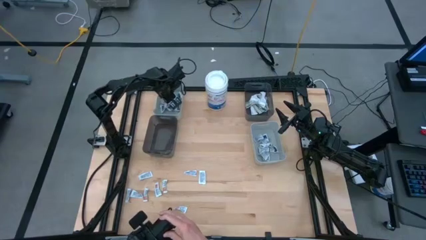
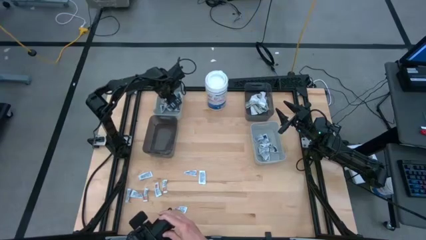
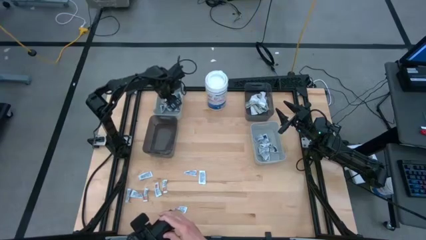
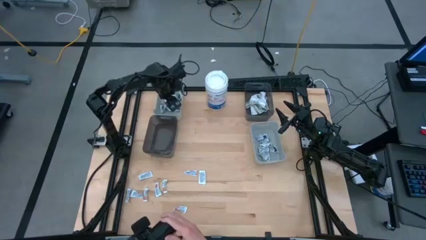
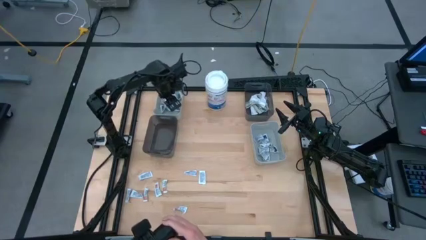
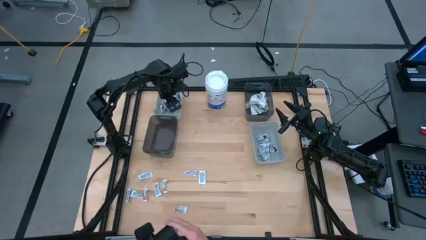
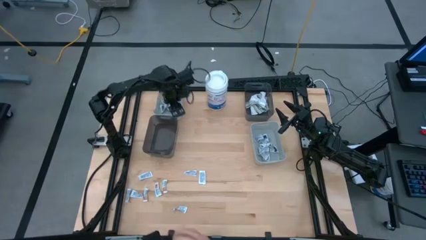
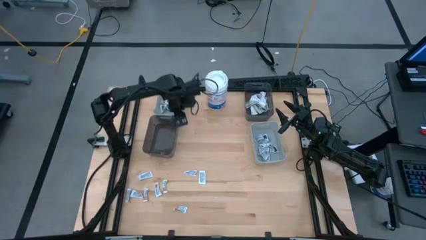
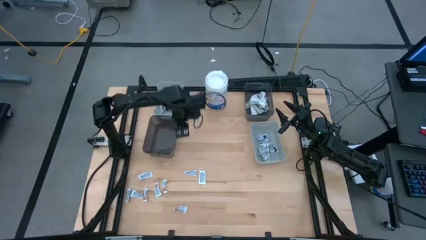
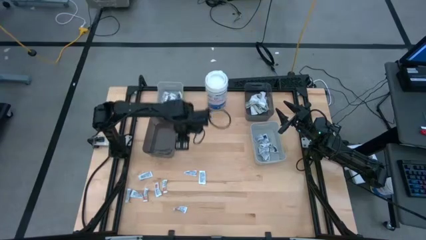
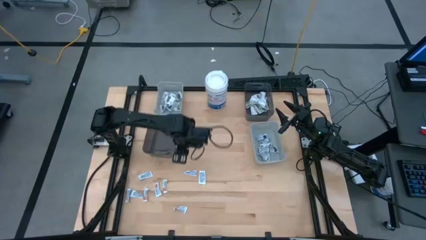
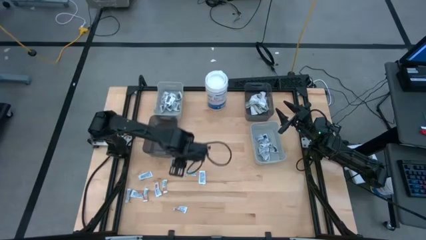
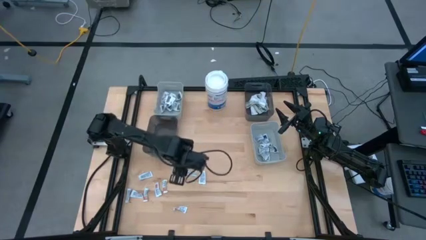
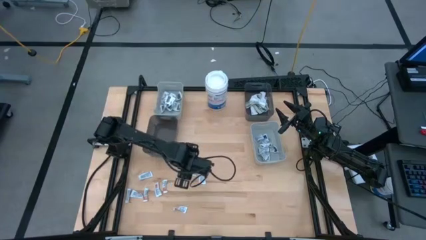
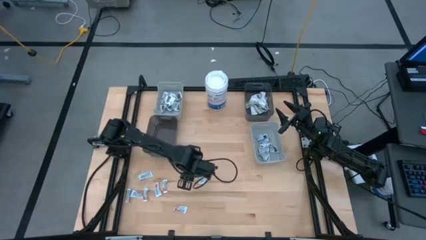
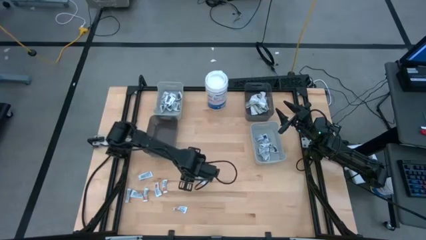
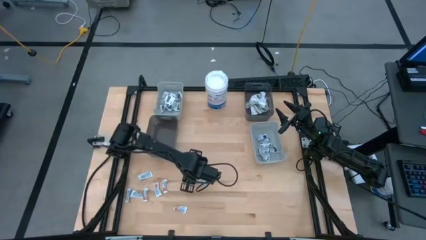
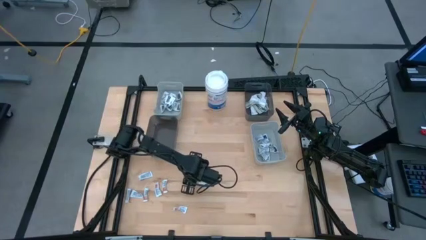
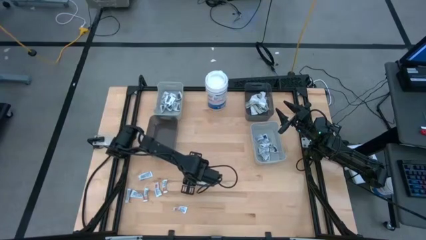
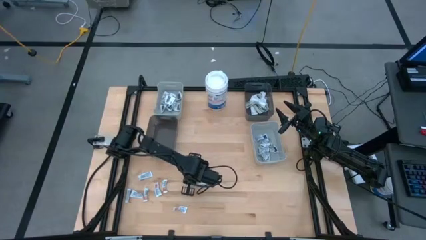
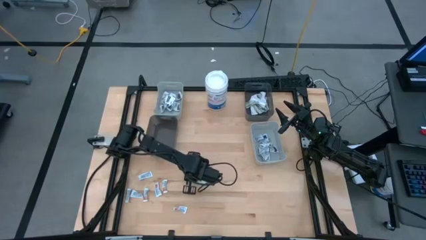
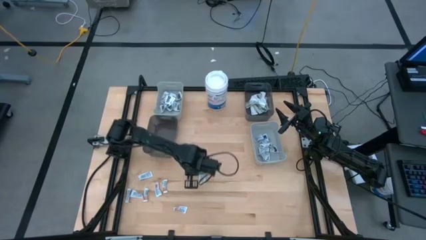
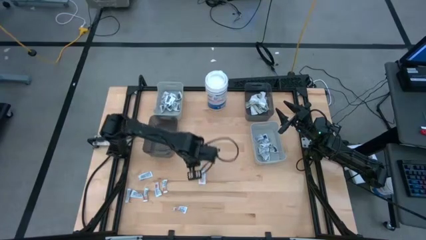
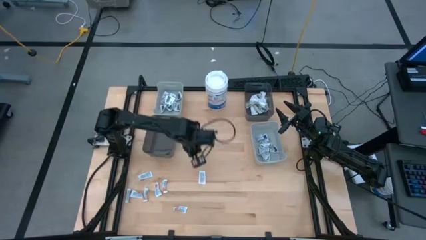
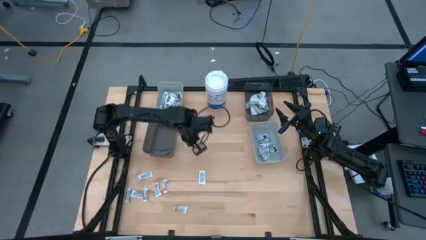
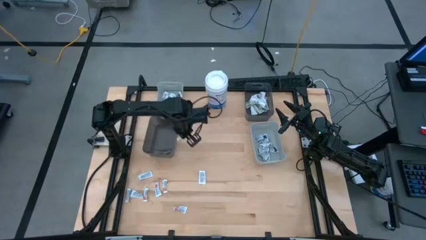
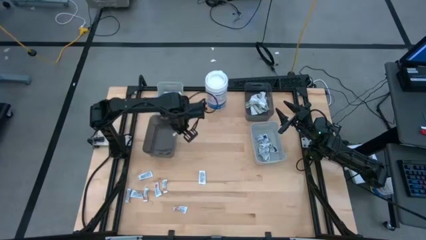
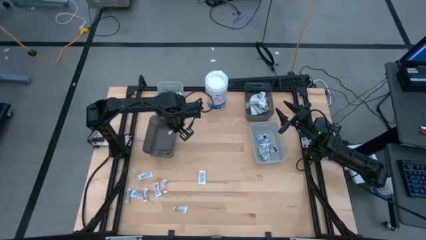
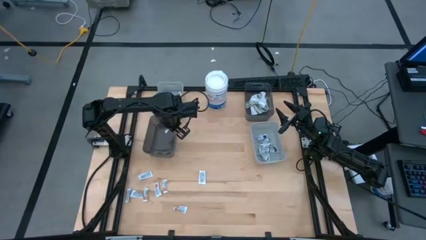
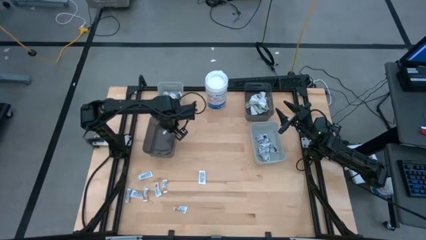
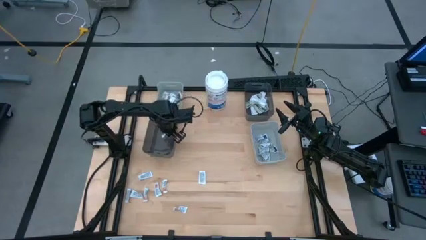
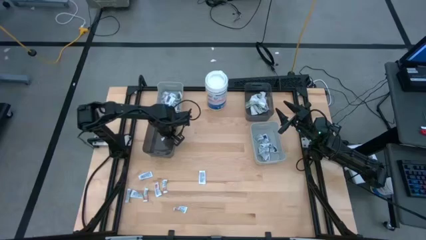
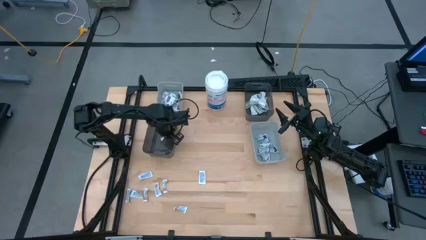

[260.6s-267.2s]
Task: Pick & Place First Aid Supplies
Put the orange ointment pack into the left black bin

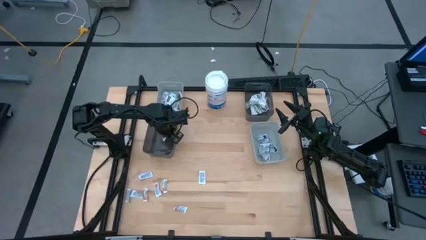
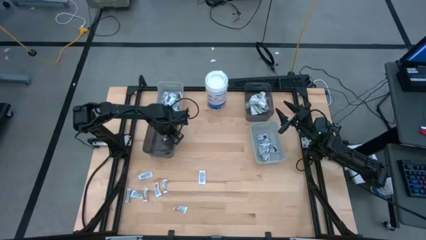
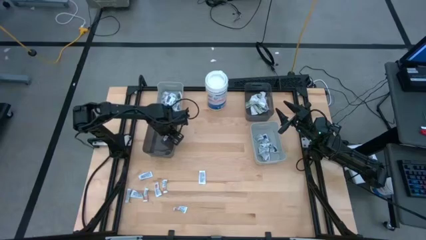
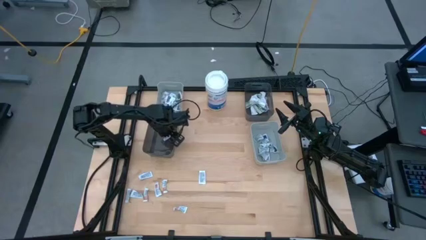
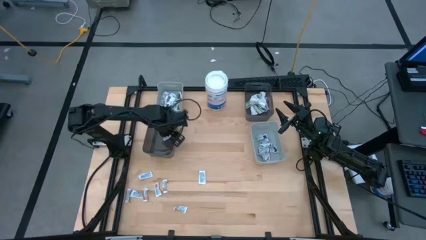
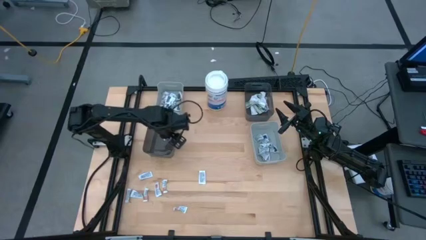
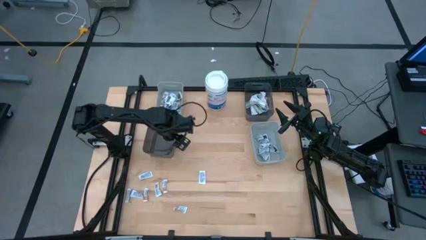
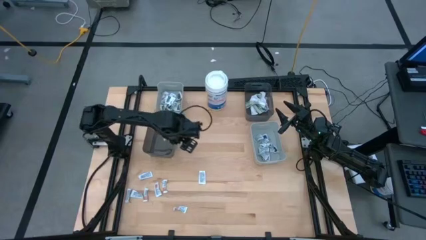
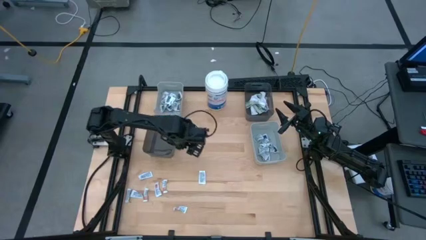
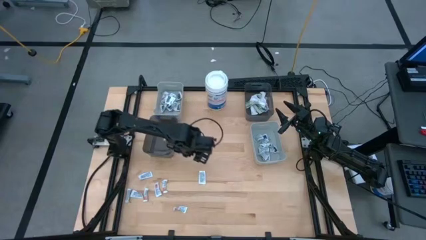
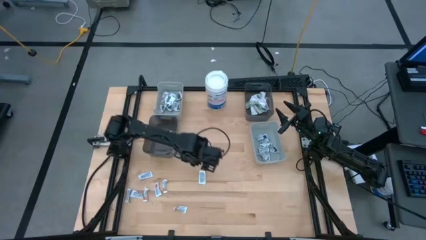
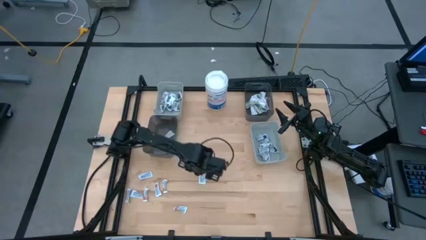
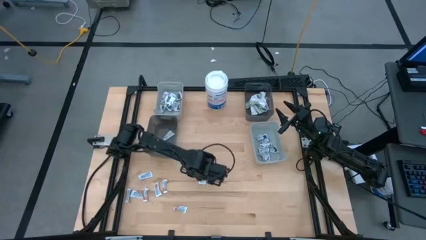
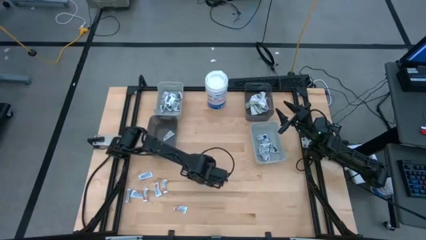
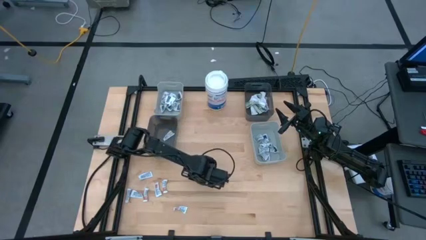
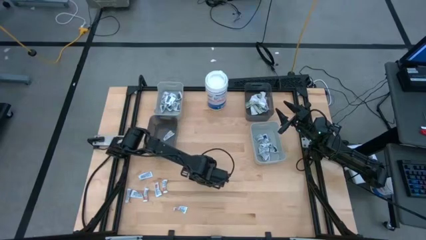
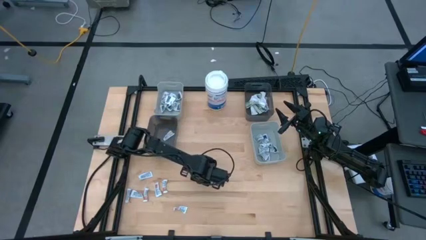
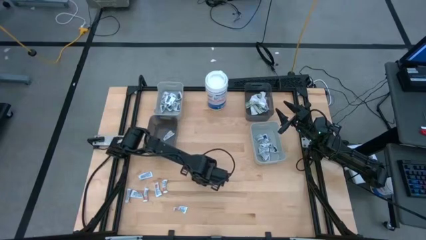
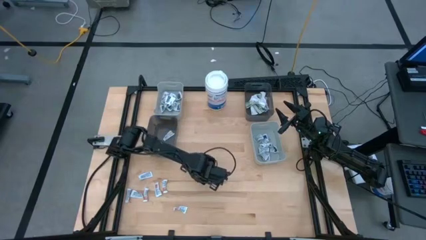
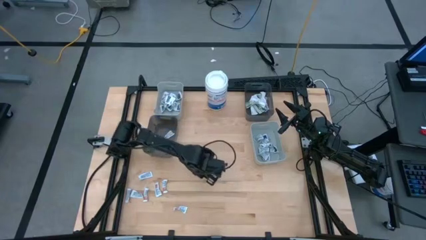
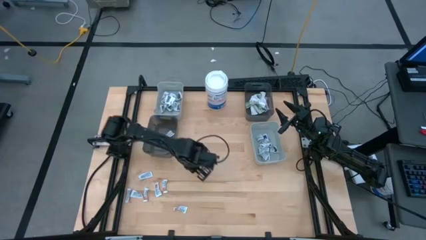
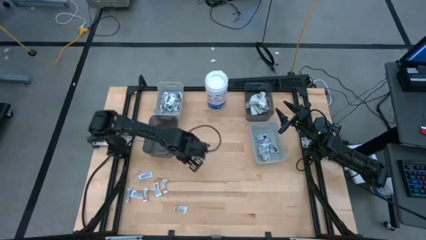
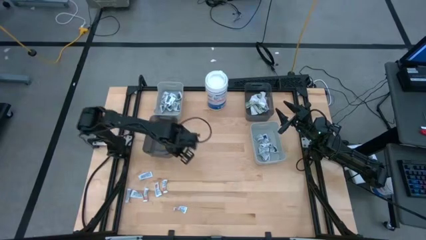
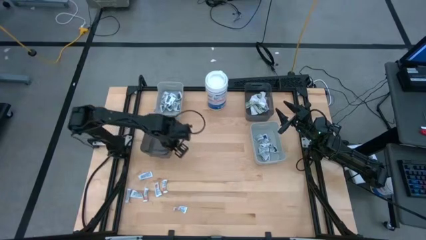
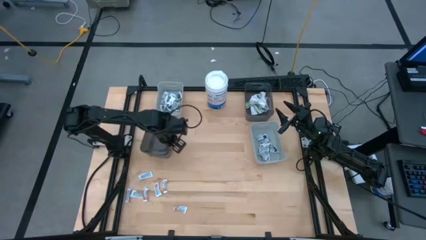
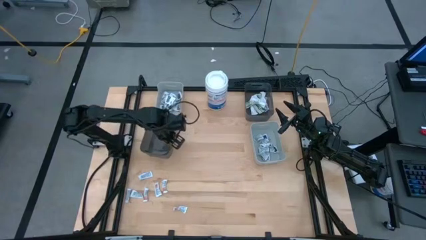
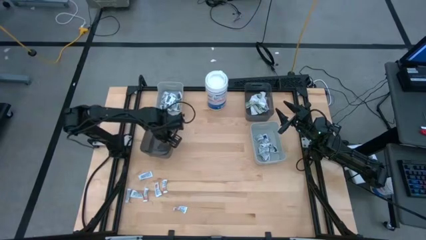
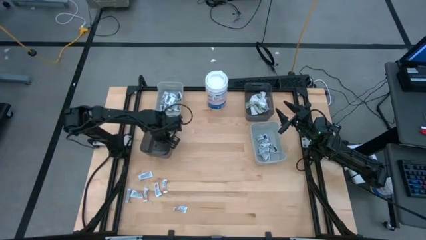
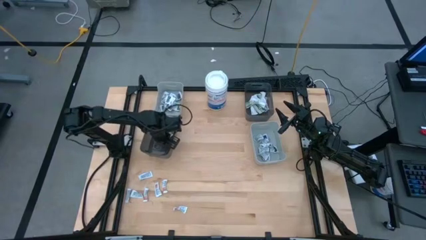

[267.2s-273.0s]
Put the orange ointment pack into the left black bin

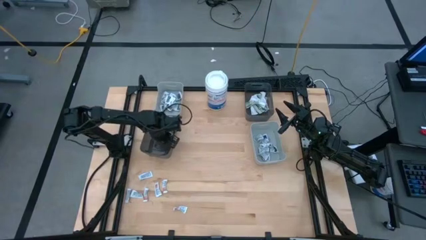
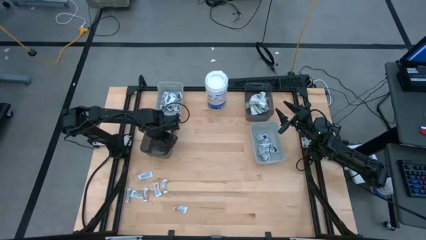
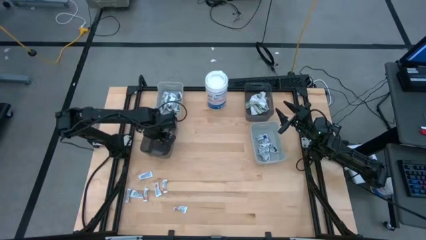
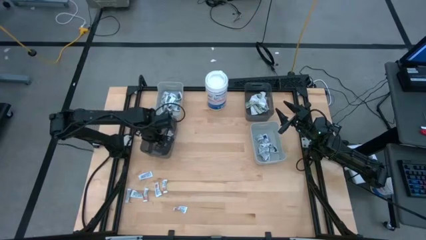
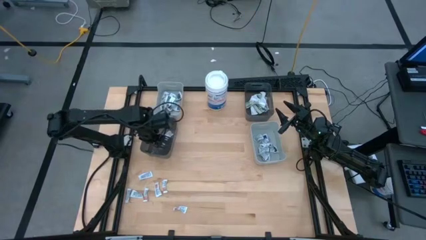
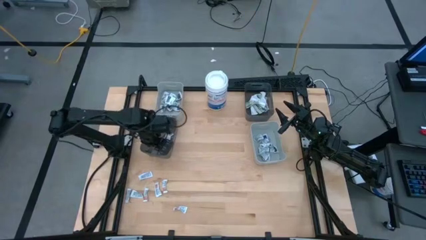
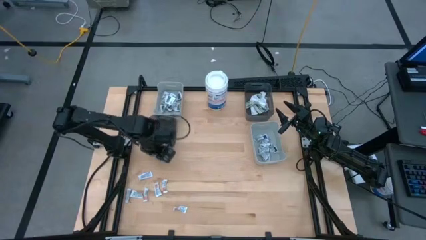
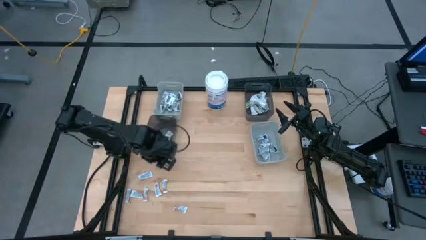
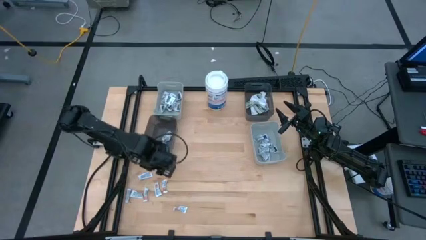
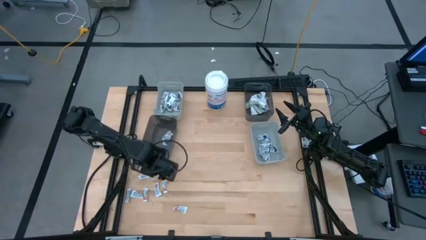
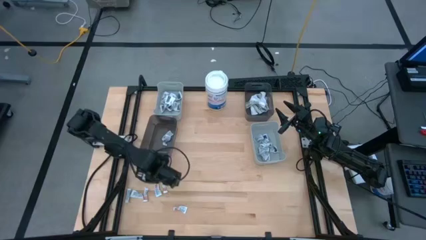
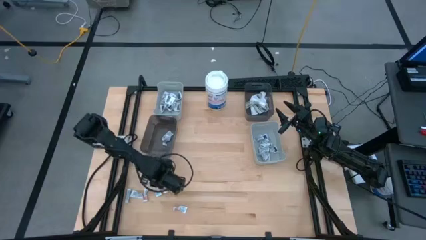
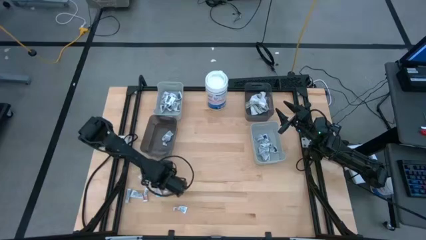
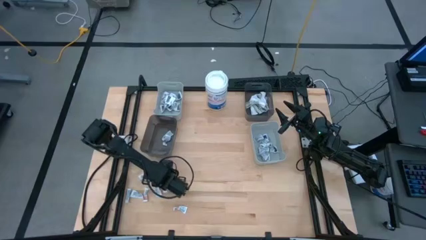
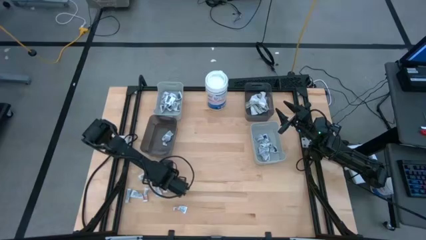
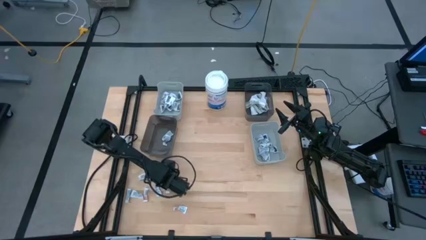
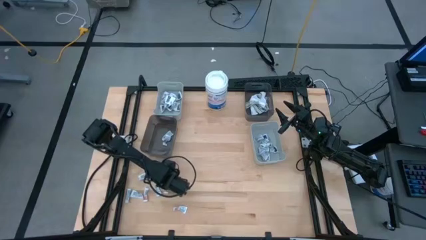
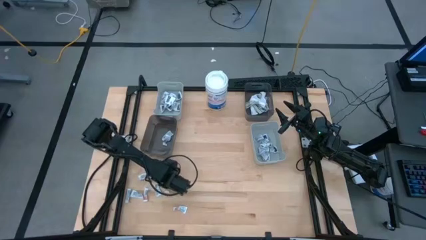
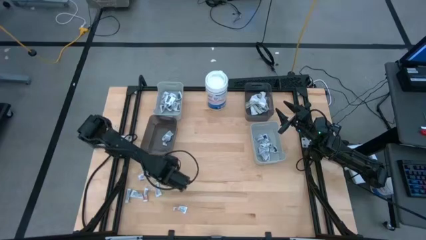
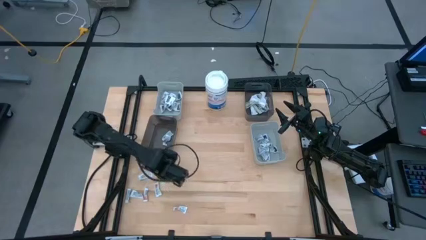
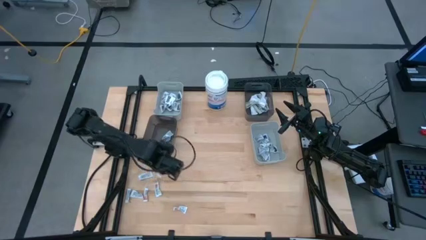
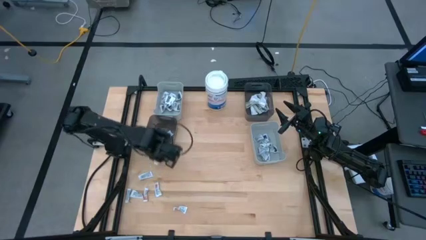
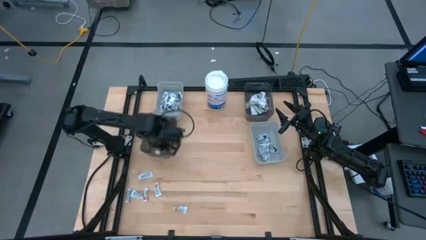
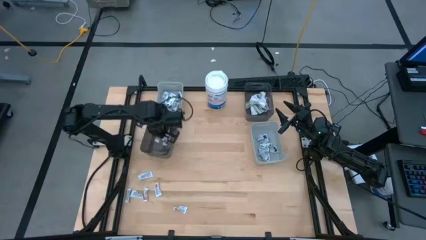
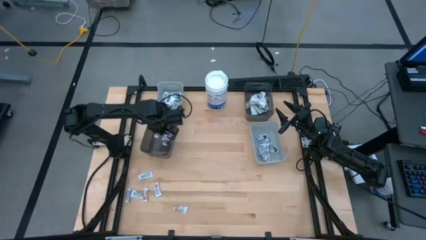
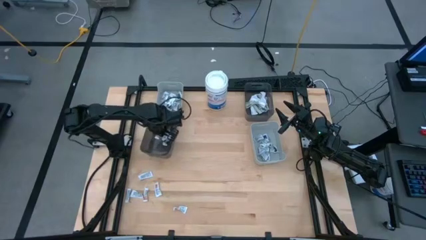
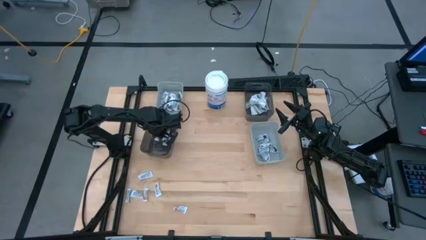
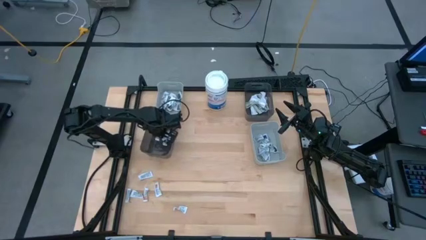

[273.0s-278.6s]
Put the orange ointment pack into the left black bin
